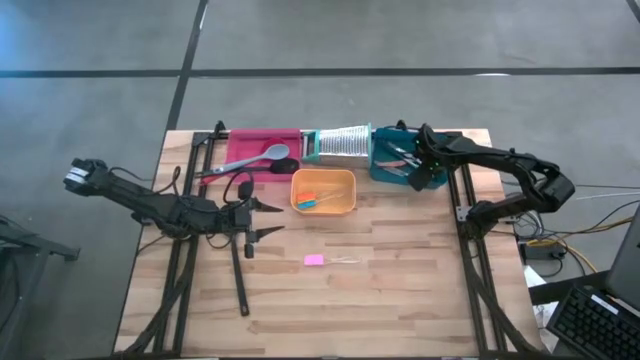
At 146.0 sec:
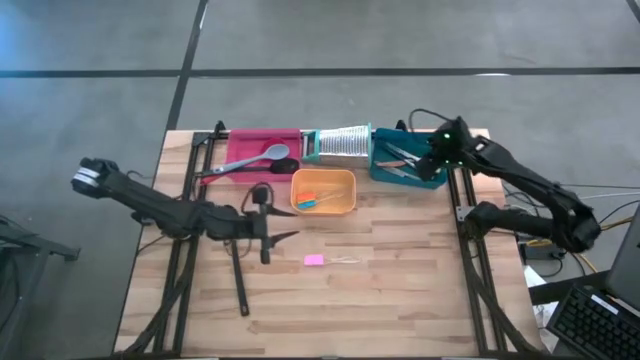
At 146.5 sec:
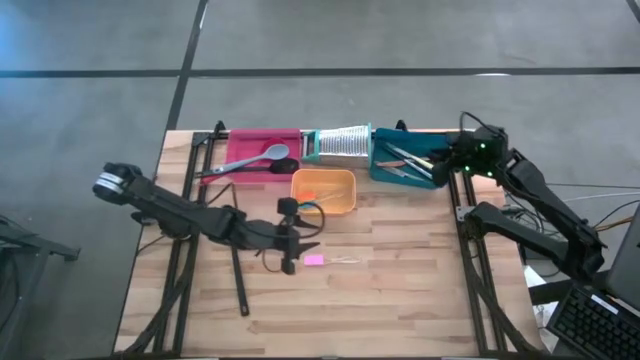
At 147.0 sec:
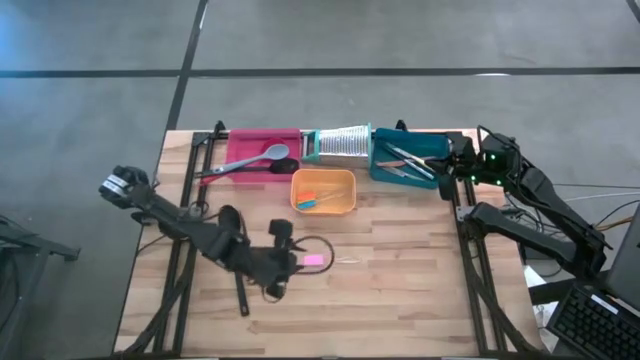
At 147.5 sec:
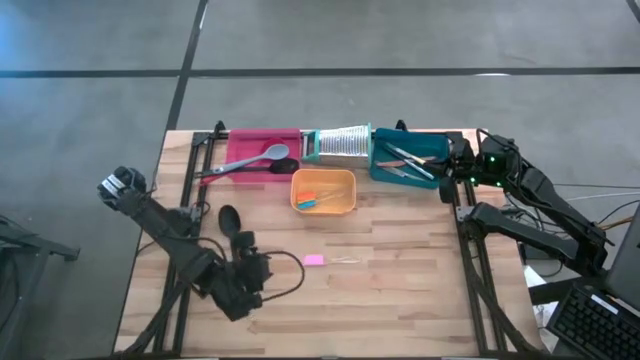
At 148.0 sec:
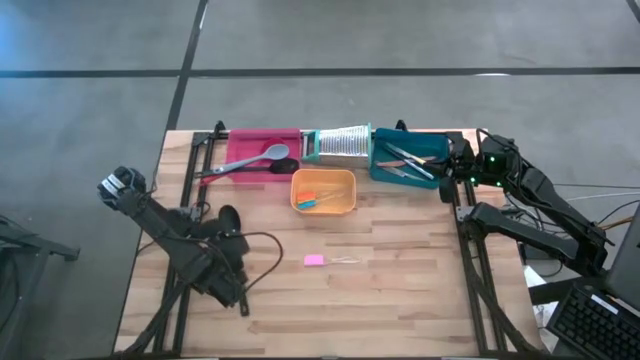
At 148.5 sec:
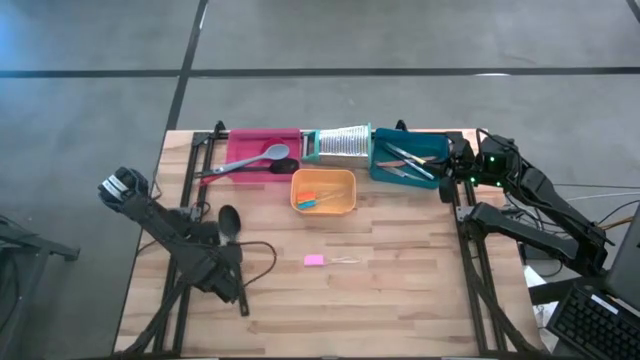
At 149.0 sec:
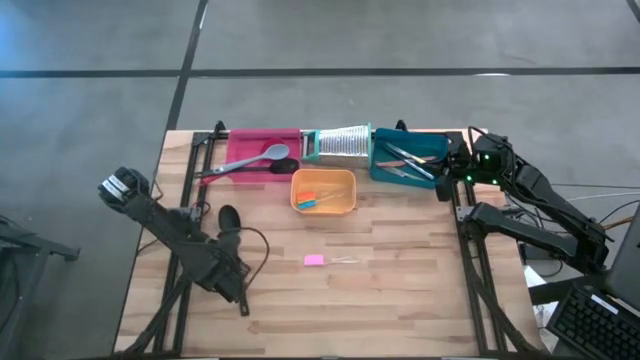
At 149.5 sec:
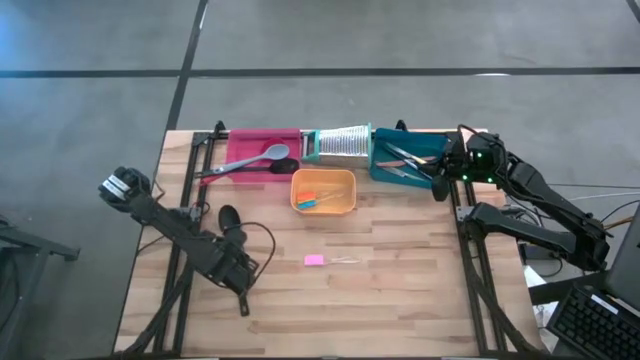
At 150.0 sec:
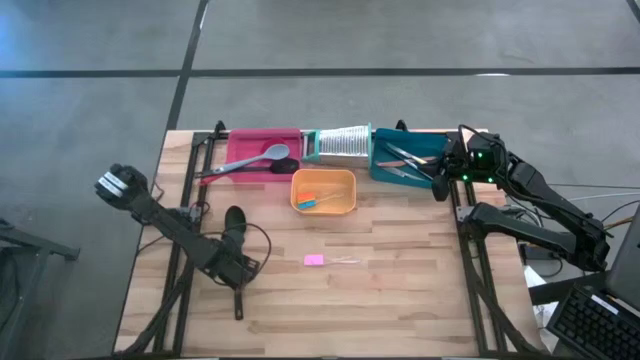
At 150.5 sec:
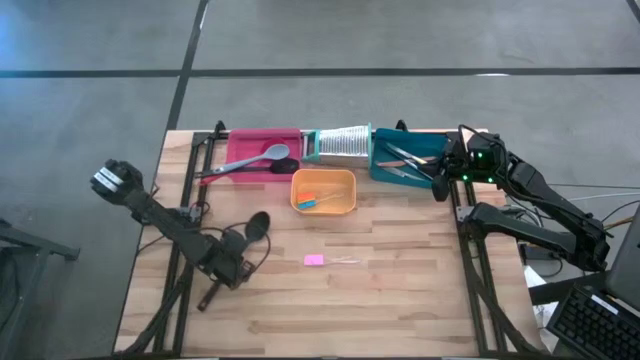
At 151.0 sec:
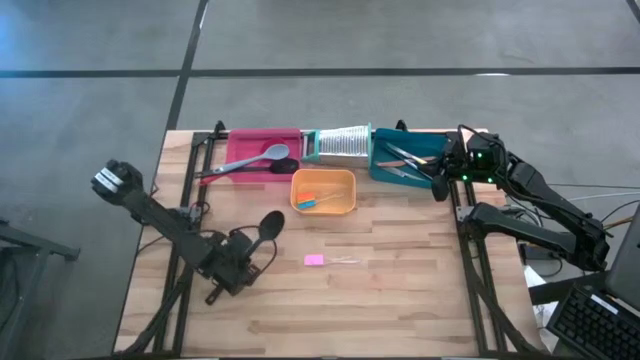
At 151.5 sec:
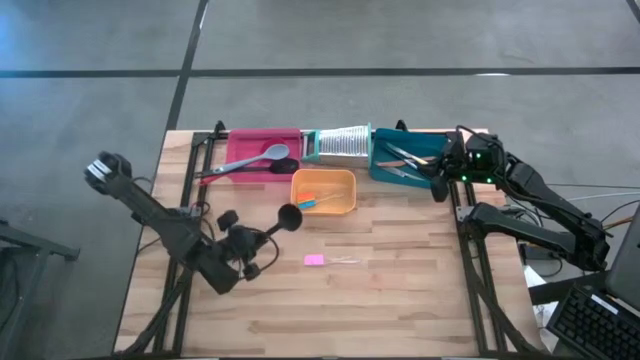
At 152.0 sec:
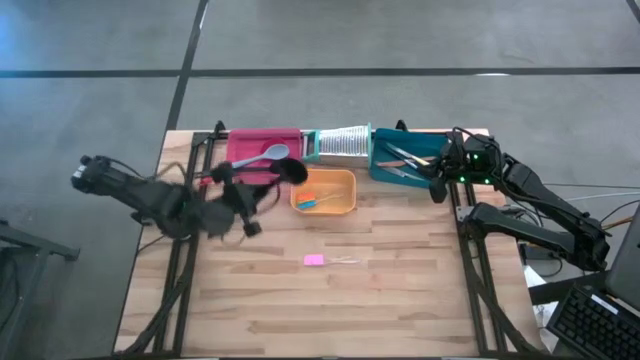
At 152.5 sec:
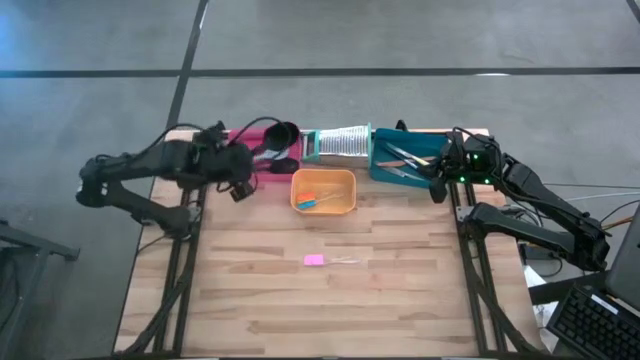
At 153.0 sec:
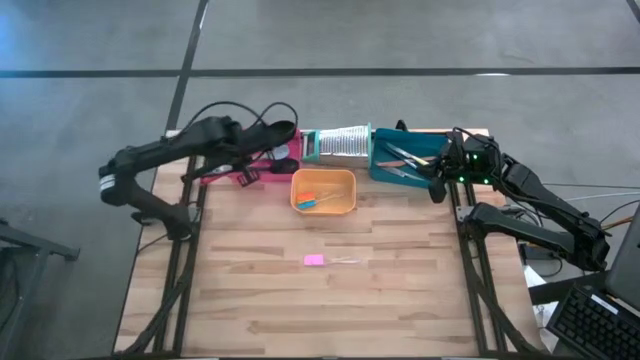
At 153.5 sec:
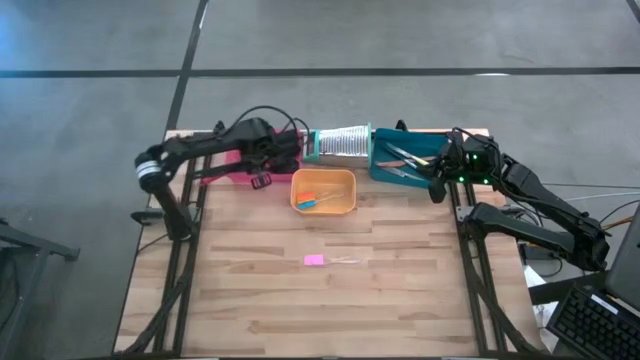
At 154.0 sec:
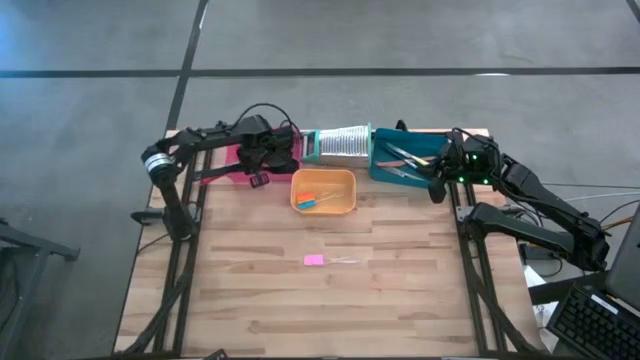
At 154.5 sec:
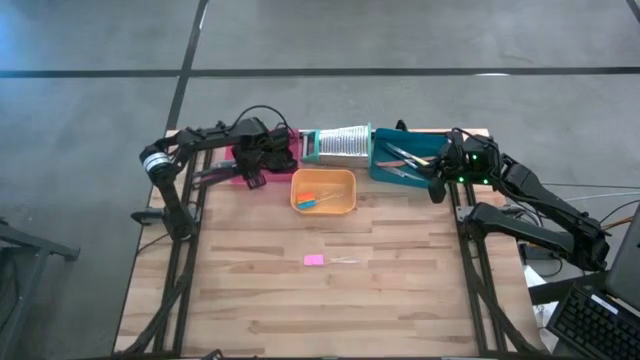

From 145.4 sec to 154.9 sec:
Task: Pick & Place Kitchen Items
Put the black spoon into the pink bin

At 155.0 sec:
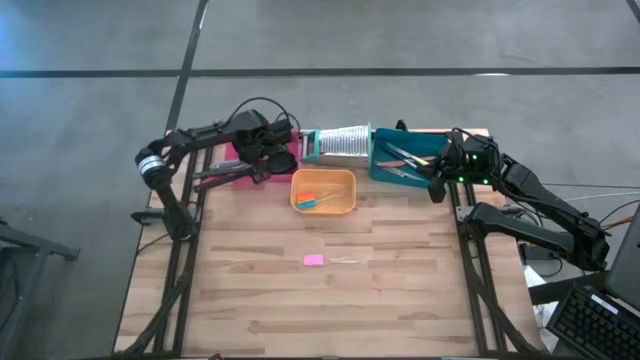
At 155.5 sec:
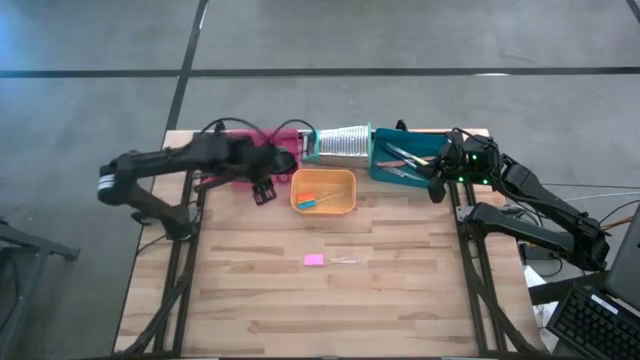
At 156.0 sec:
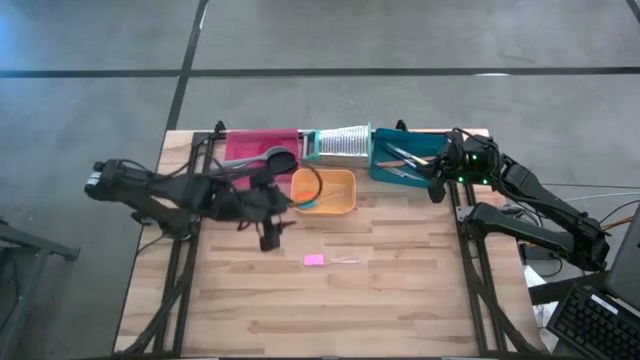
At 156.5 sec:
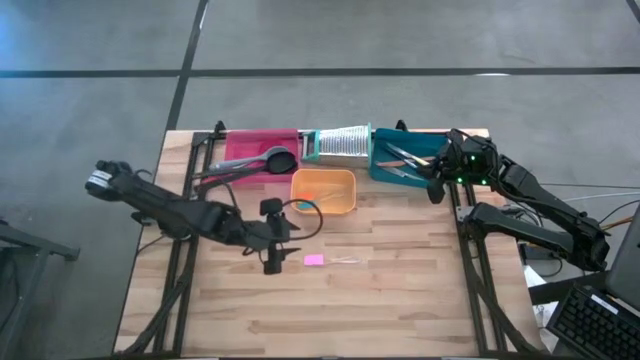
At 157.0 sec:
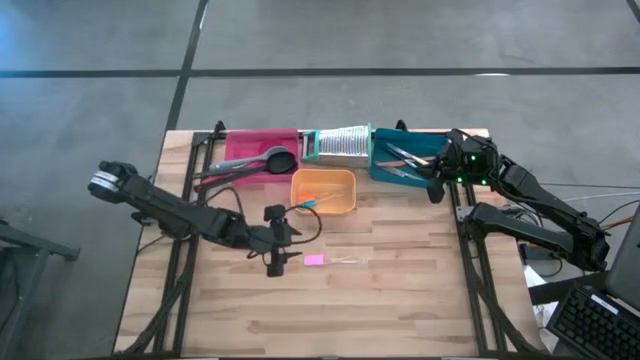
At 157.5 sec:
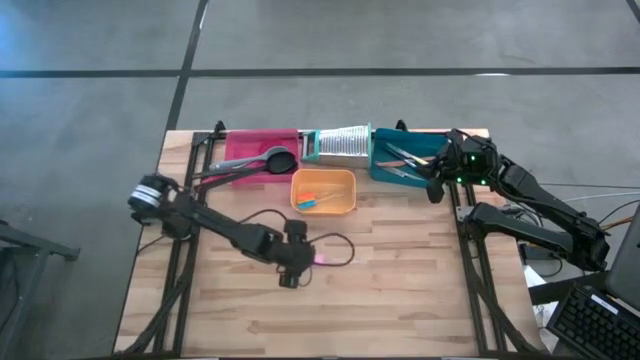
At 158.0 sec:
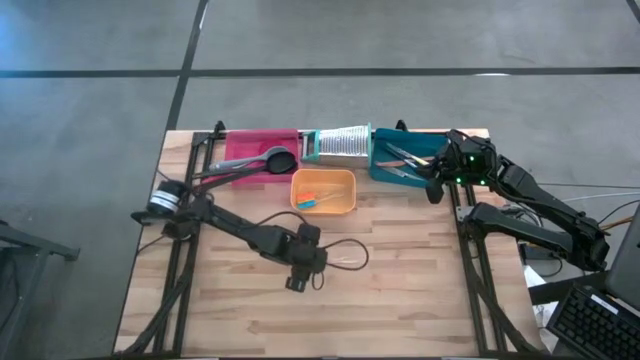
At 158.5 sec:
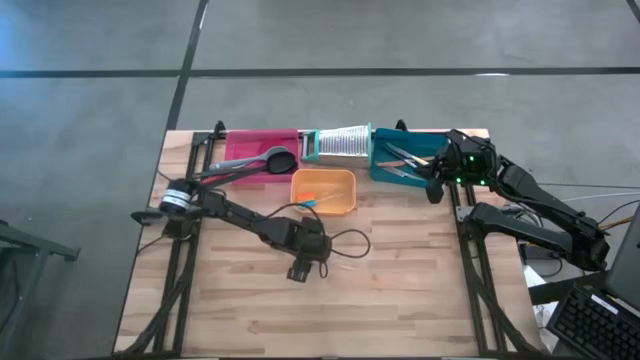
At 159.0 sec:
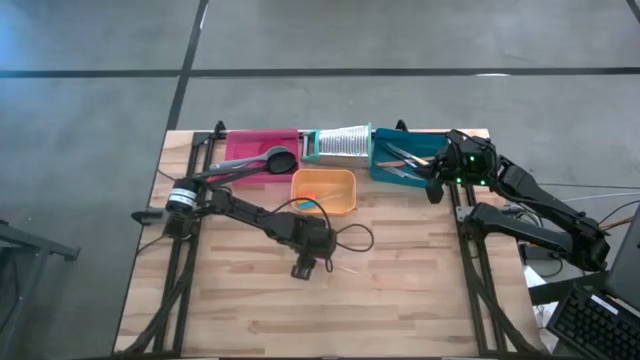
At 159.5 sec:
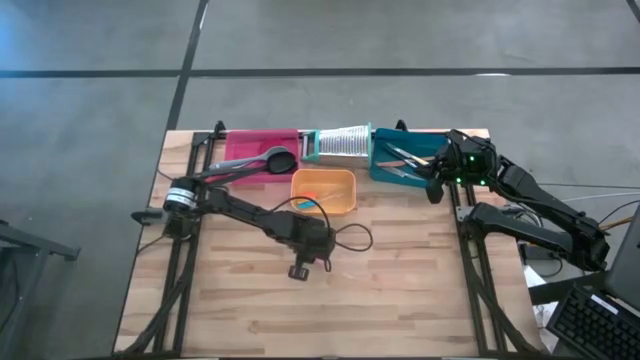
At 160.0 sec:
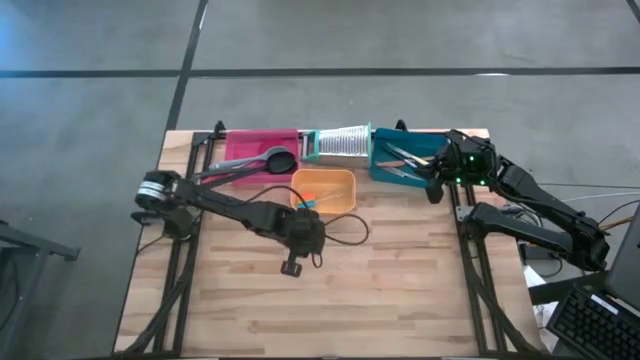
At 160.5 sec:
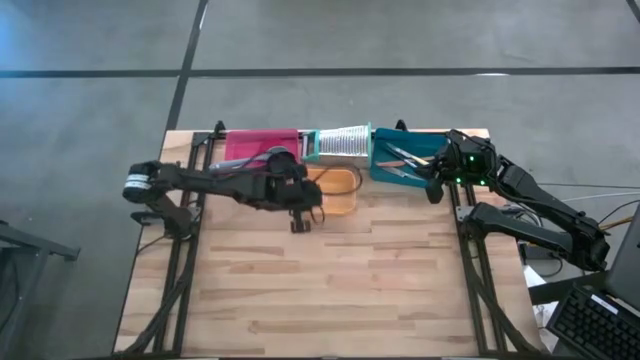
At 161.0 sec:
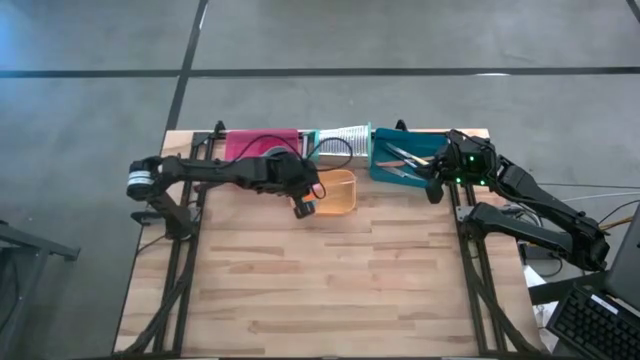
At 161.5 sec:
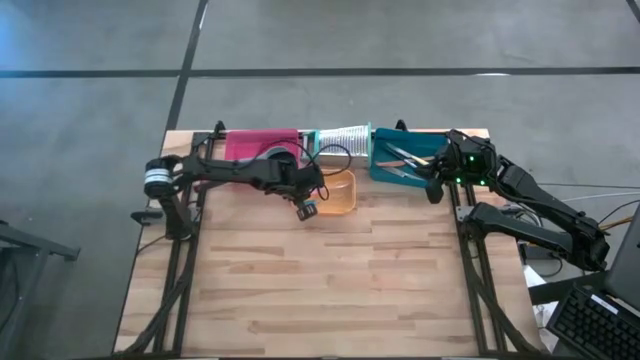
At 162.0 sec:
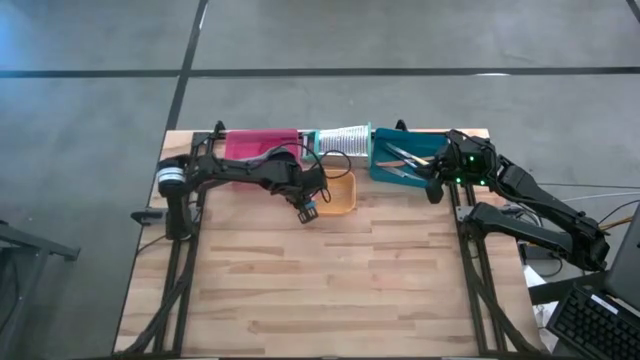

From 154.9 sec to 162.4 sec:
Put the pink spatula into the yellow bin

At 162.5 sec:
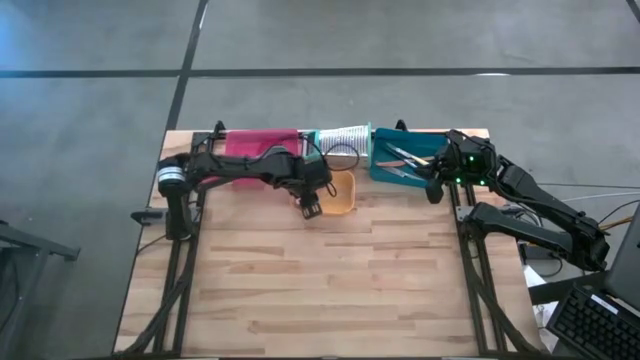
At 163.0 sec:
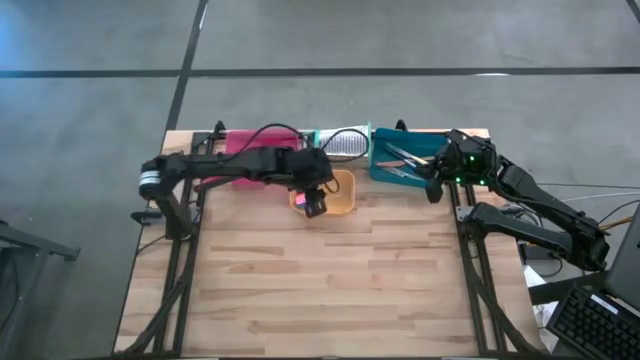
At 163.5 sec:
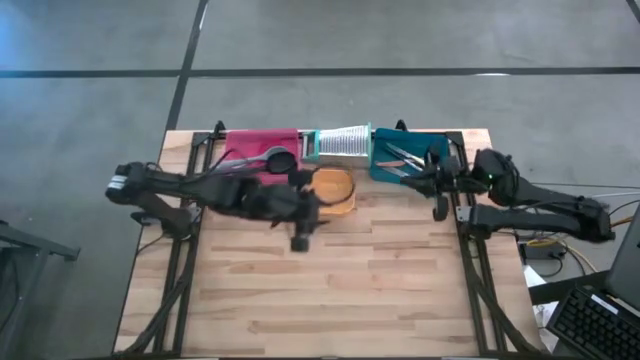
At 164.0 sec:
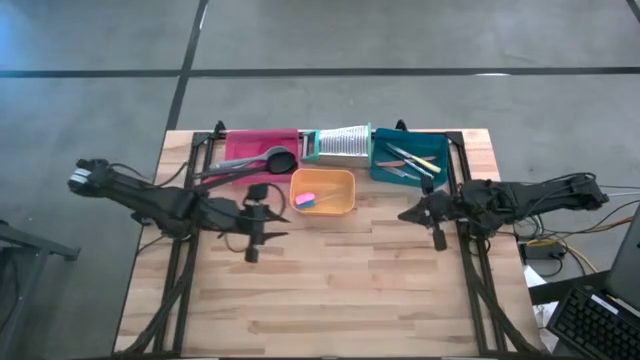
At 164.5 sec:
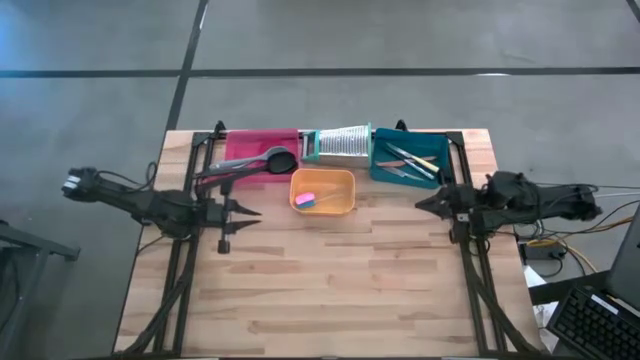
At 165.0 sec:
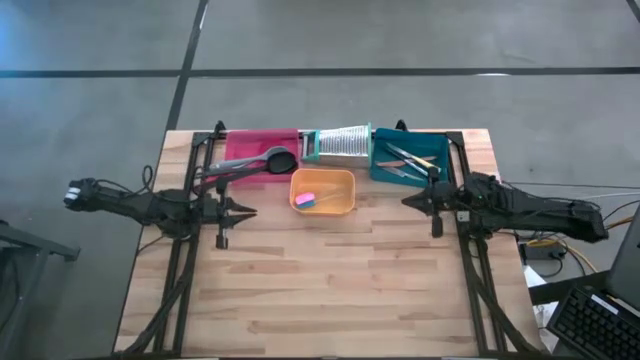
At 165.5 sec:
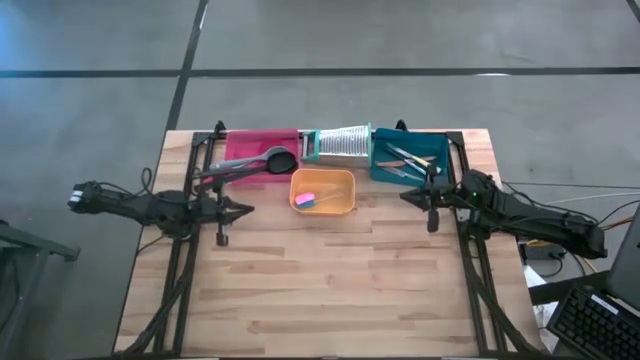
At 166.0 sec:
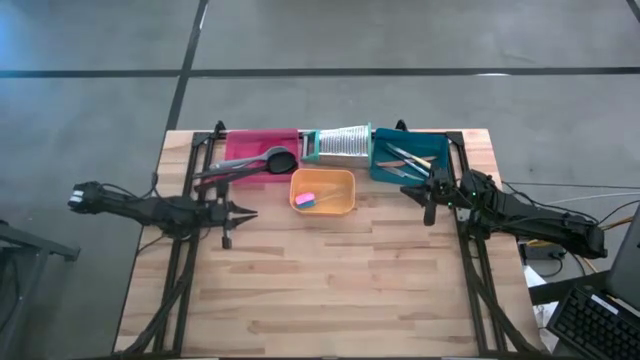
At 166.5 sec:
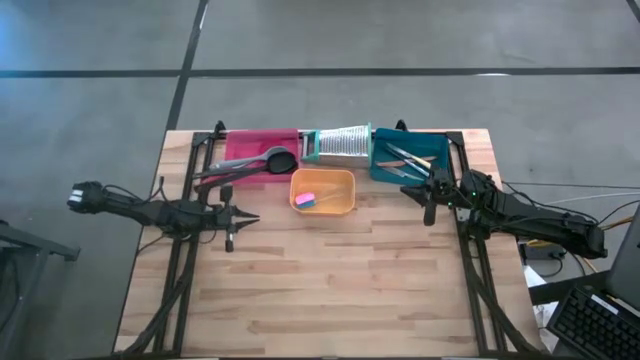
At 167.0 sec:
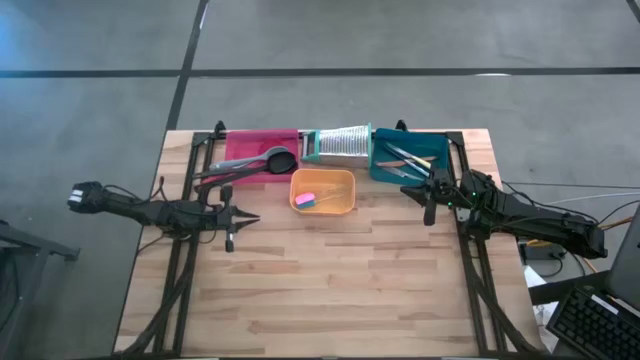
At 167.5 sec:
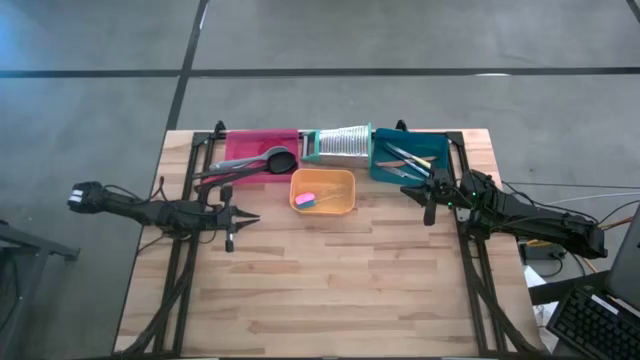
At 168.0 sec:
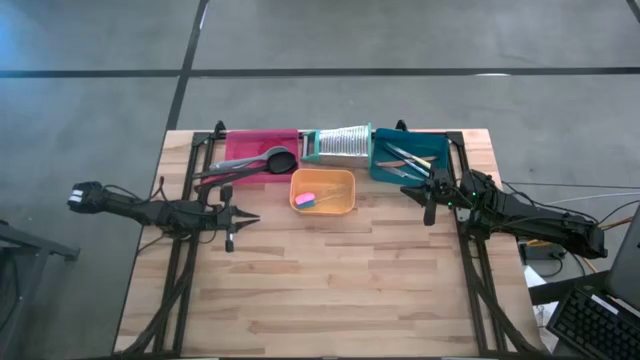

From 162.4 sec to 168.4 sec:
Return to Home Position
